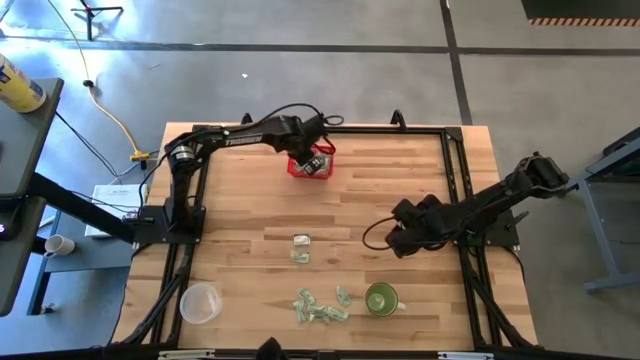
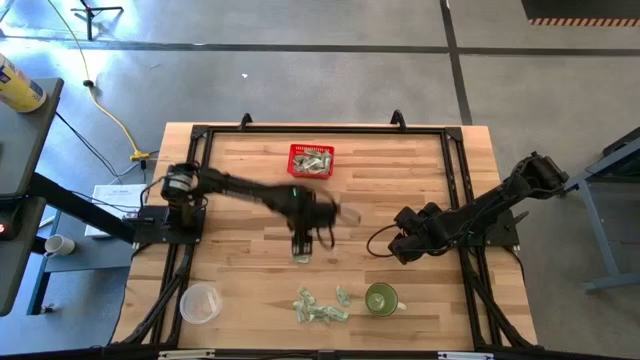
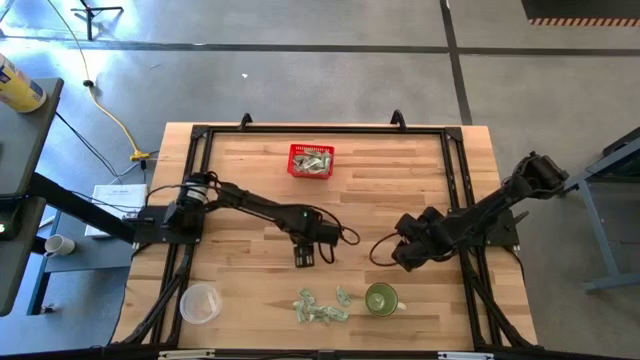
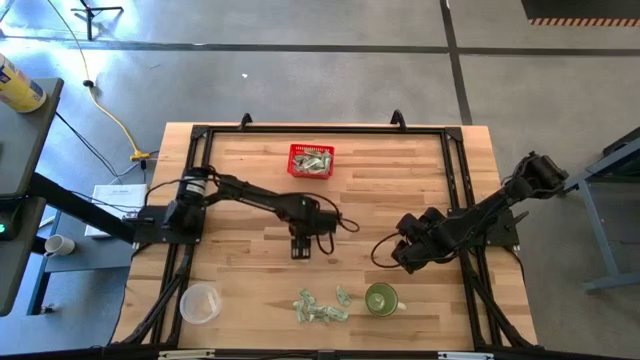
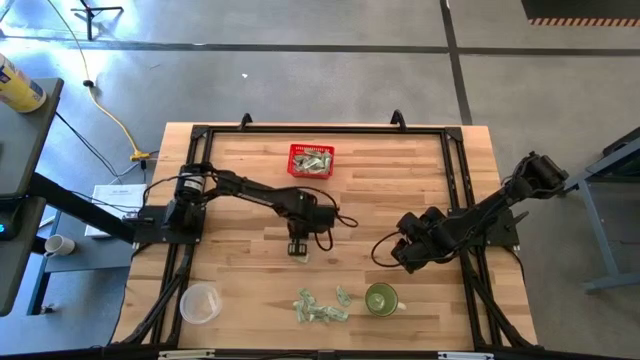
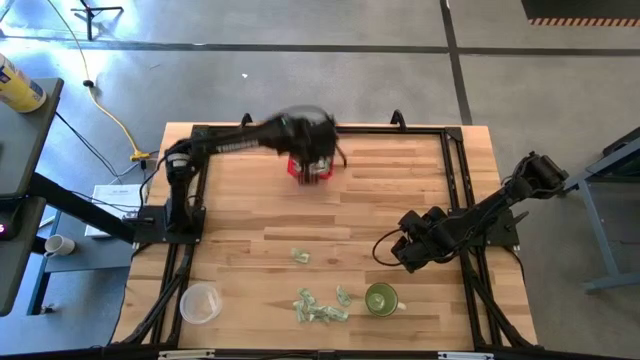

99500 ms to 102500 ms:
Task: Pick and place items into bin
Put the green stevia packet into the red bin

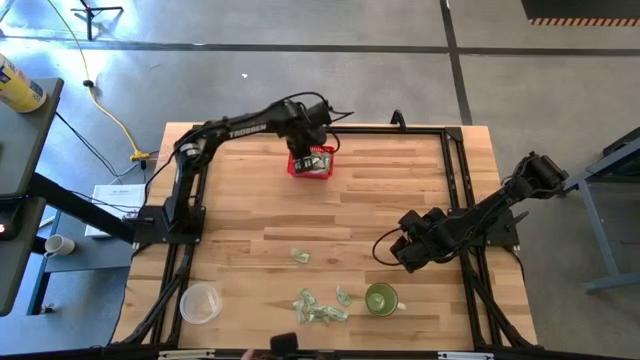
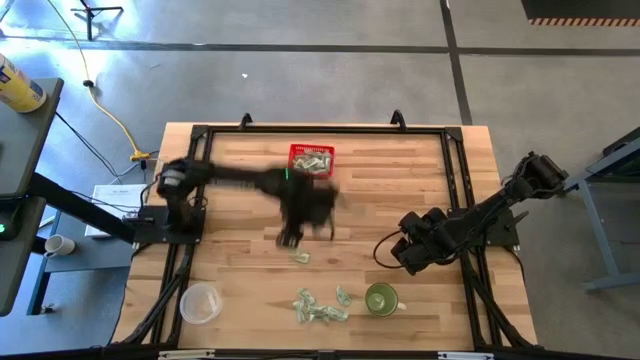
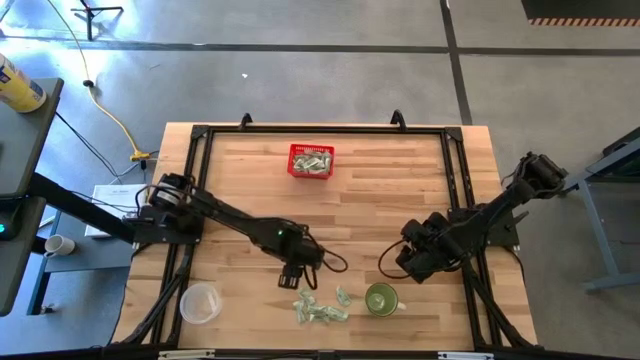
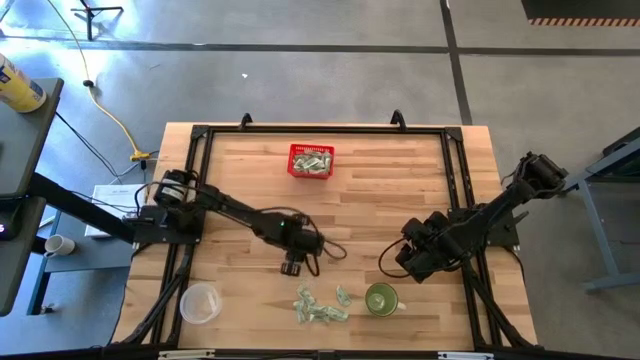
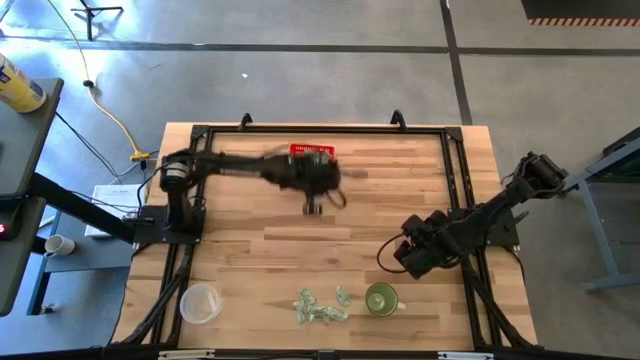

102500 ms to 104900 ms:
Put the light green stevia packet into the red bin

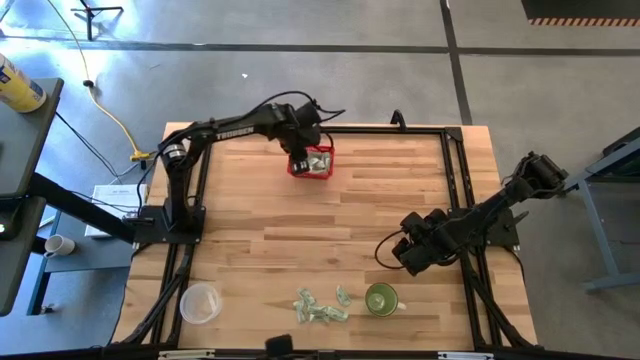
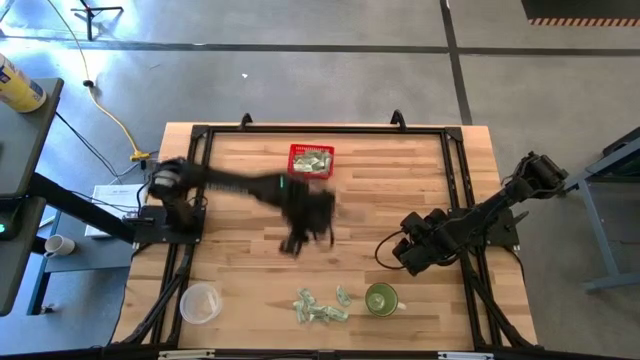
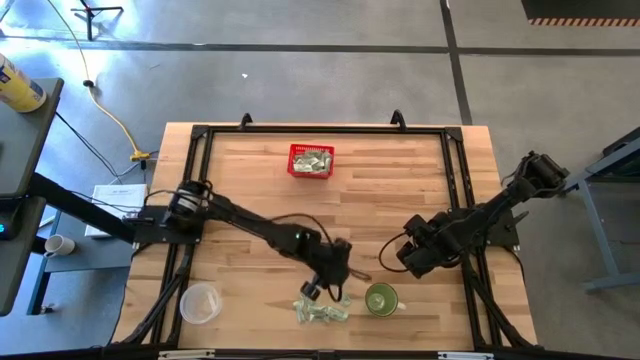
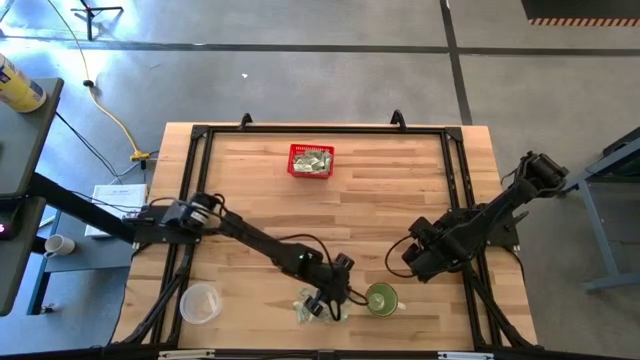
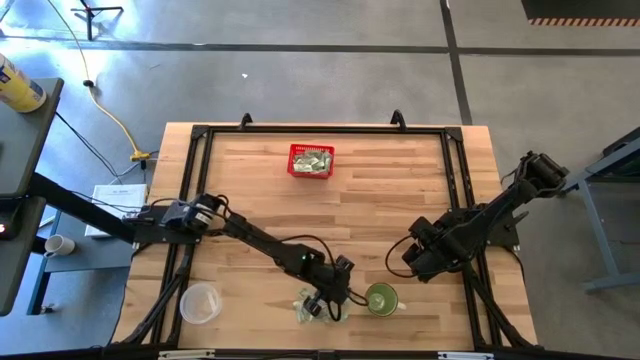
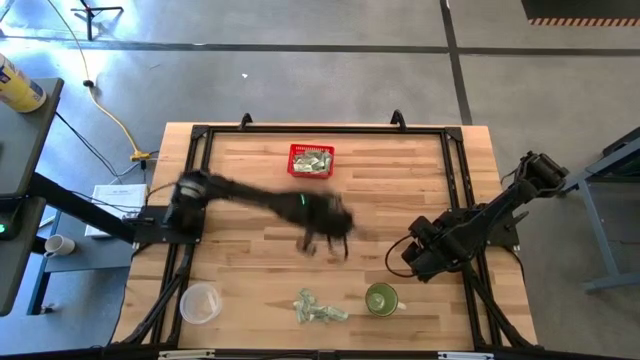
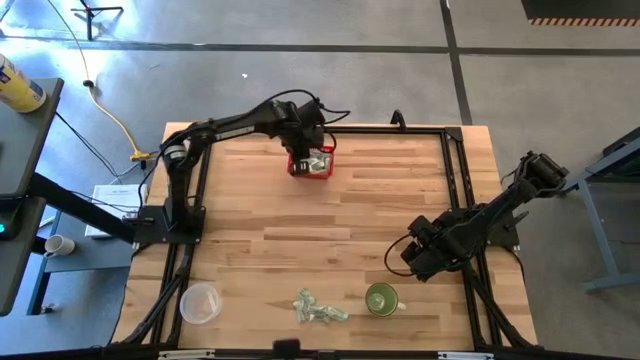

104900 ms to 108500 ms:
Put the light green stevia packet into the red bin

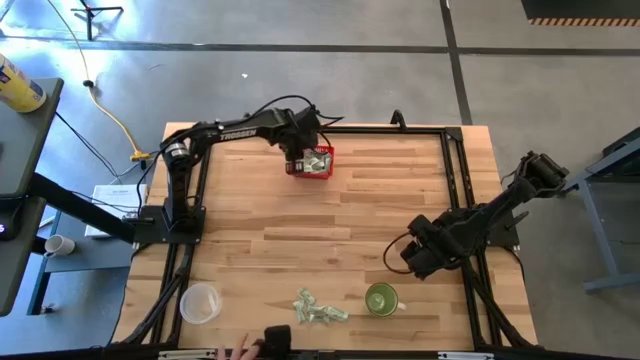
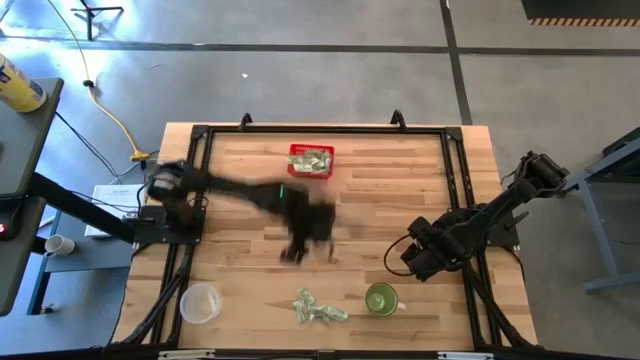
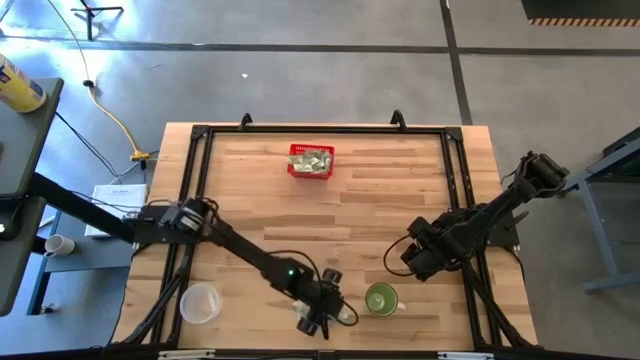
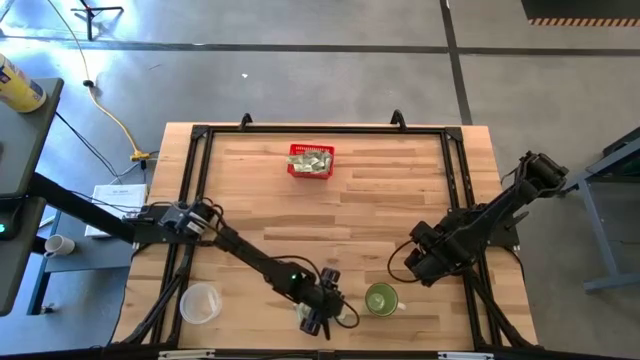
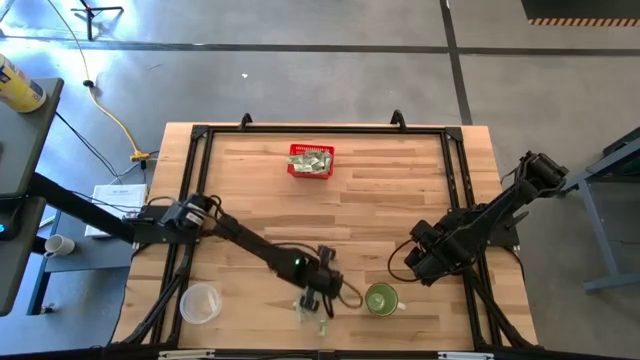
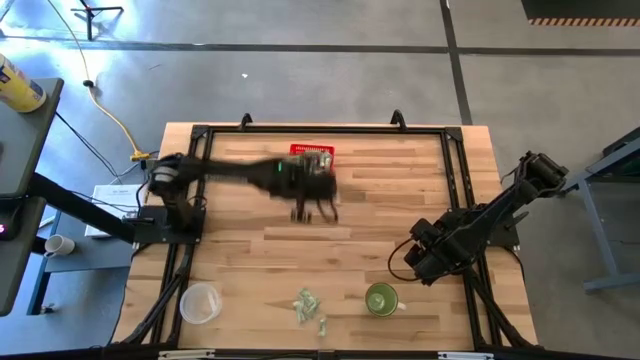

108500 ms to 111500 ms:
Put the light green stevia packet into the red bin

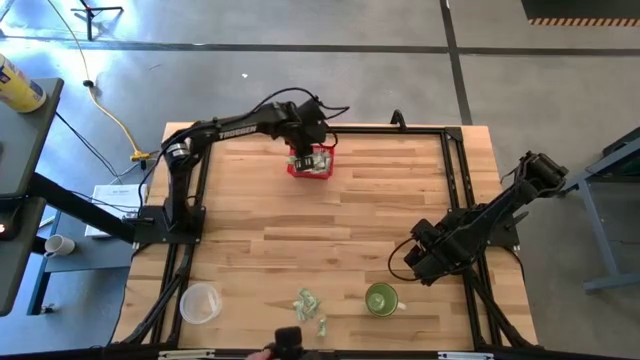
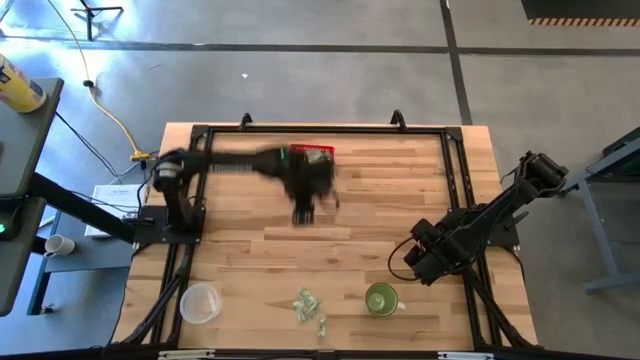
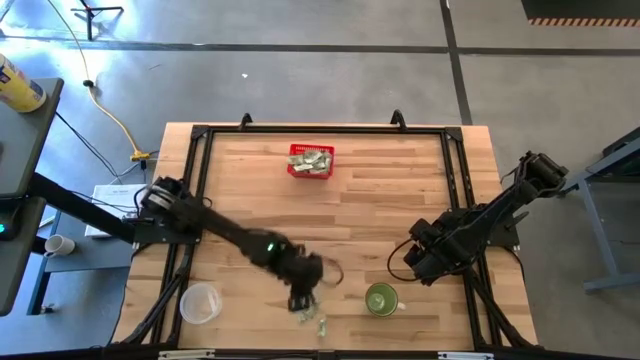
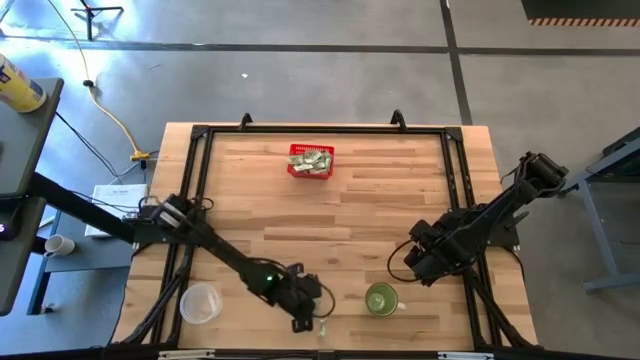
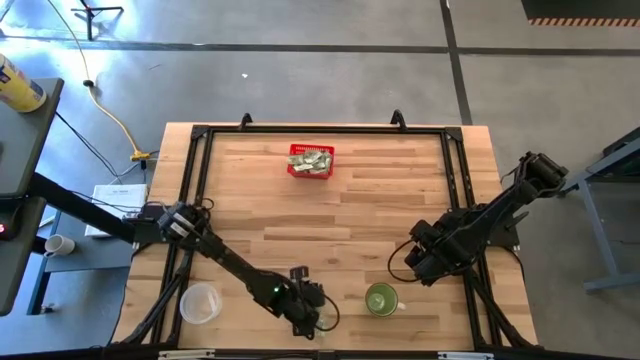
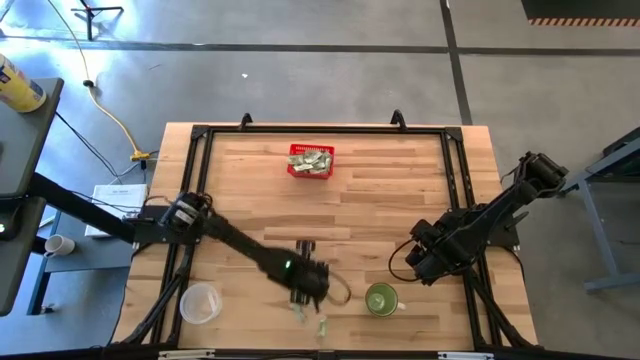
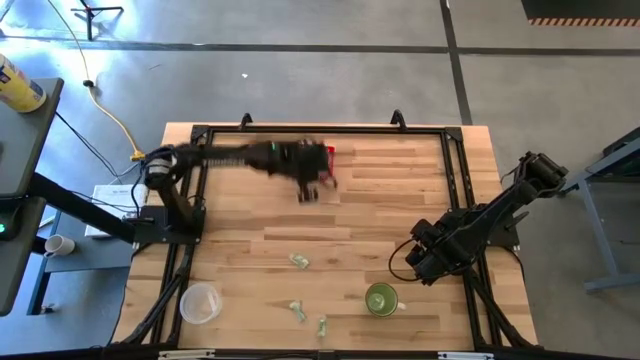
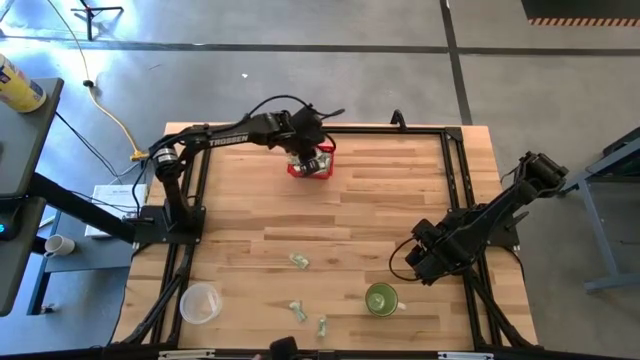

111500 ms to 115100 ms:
Put the light green stevia packet into the red bin

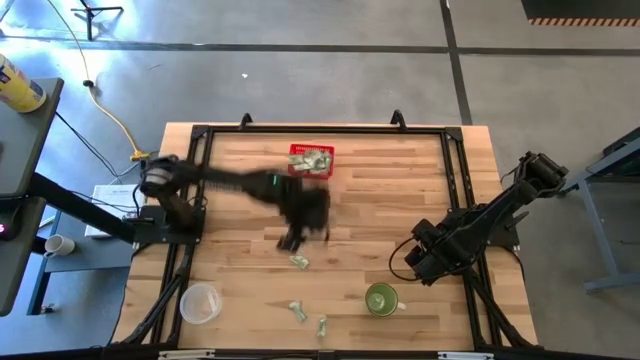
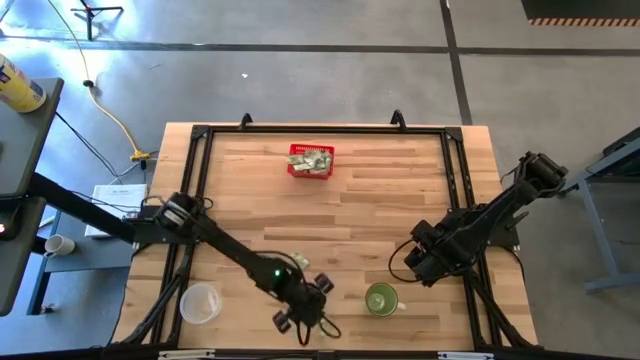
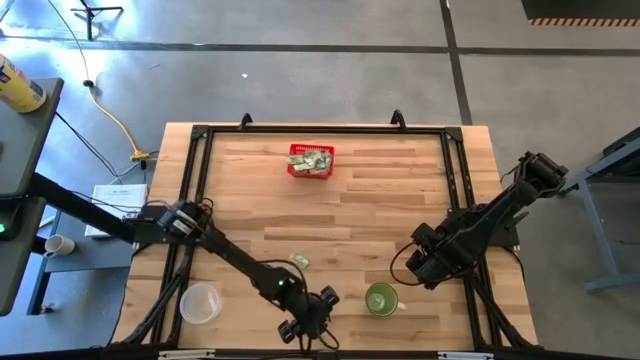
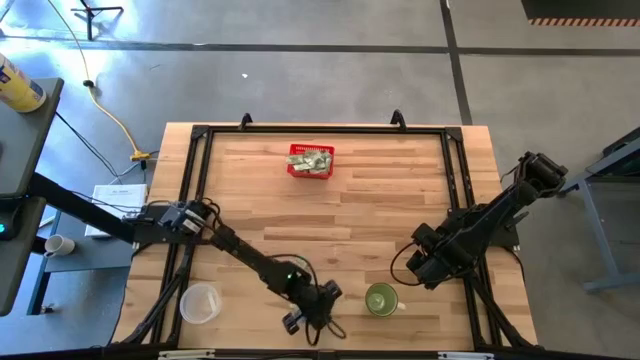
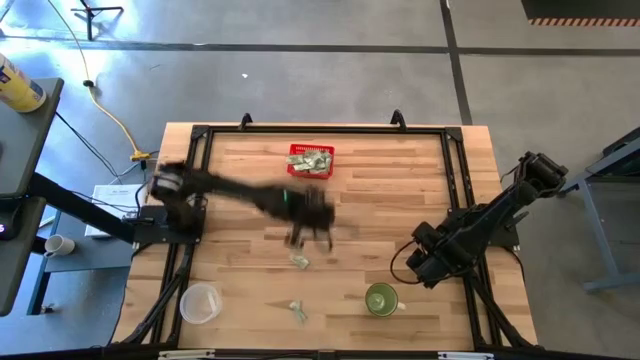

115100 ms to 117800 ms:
Put the bottom light green stevia packet into the red bin

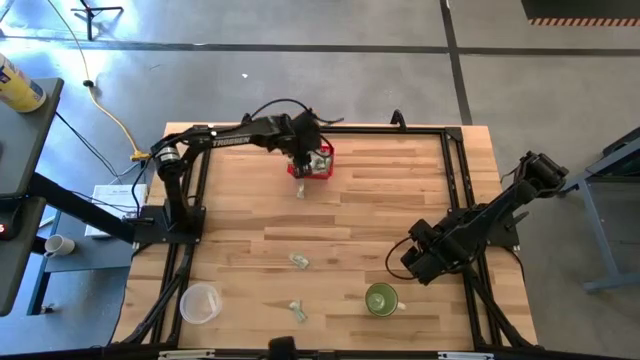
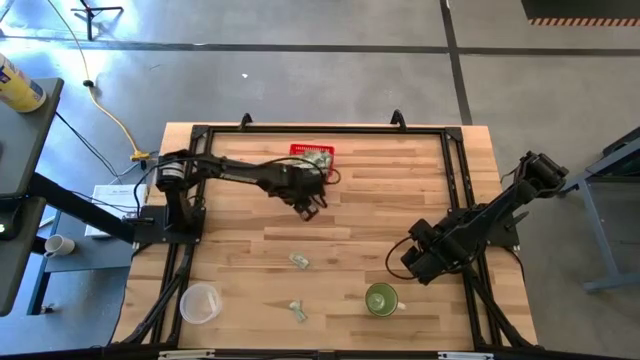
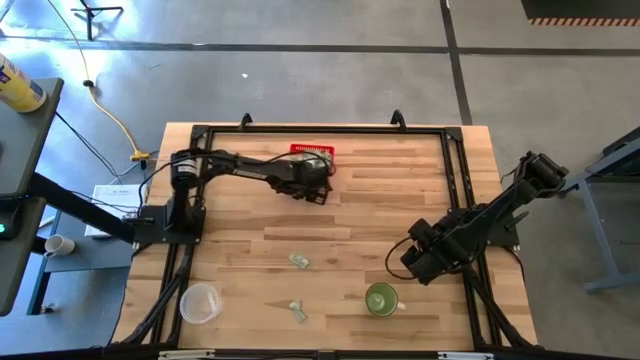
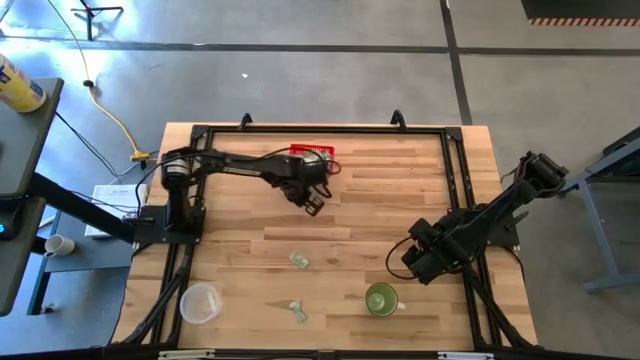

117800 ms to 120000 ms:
Put the top light green stevia packet into the red bin

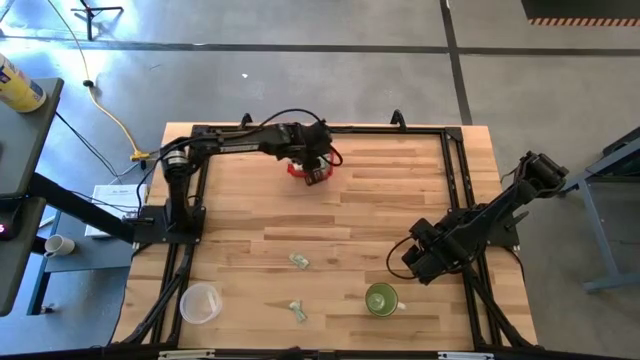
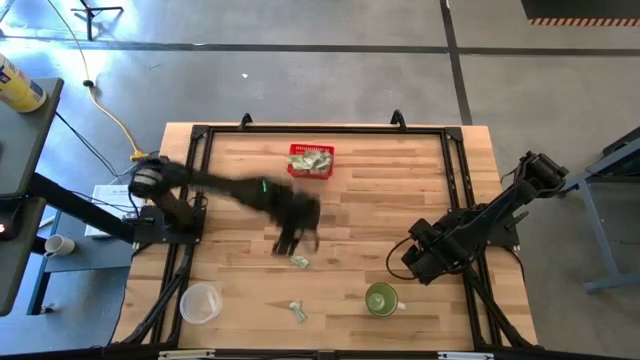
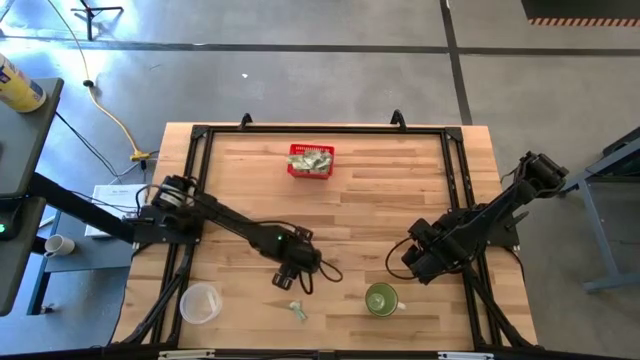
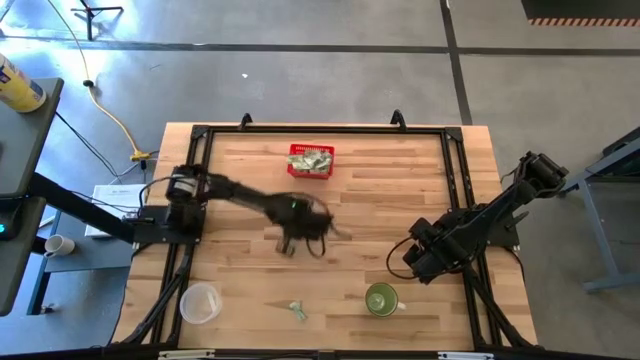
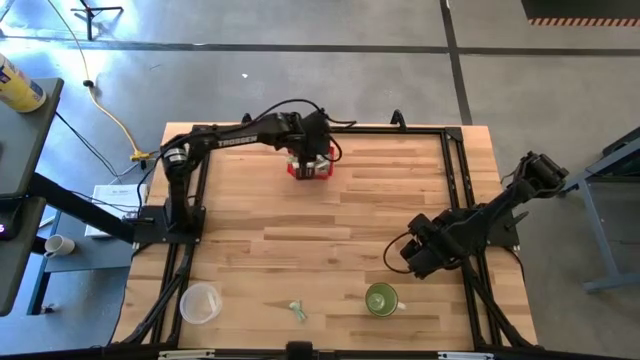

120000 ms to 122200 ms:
Put the top light green stevia packet into the red bin
